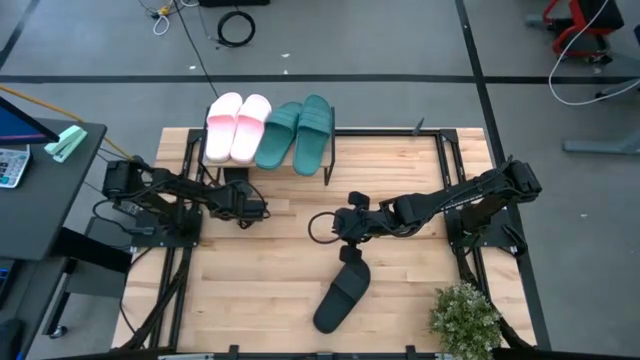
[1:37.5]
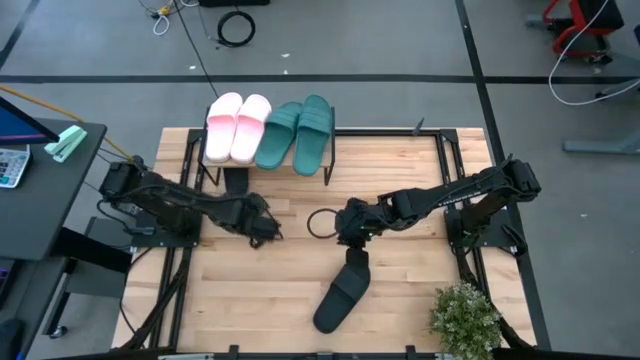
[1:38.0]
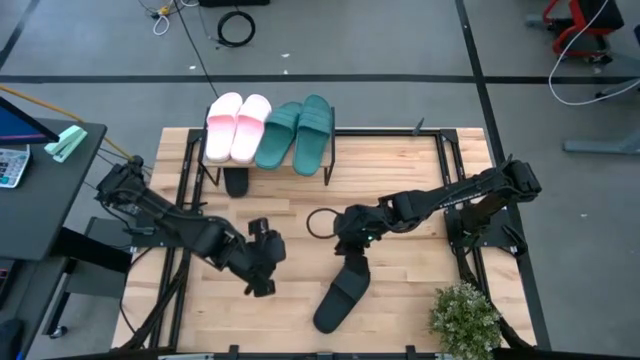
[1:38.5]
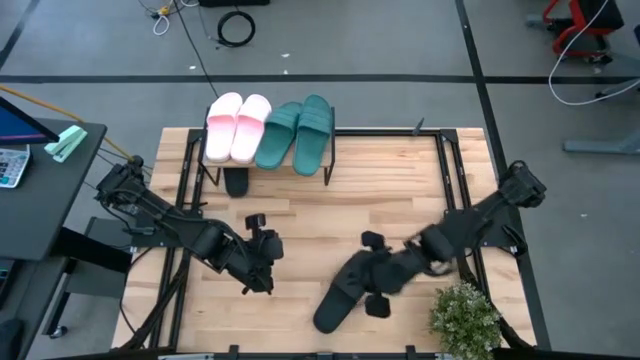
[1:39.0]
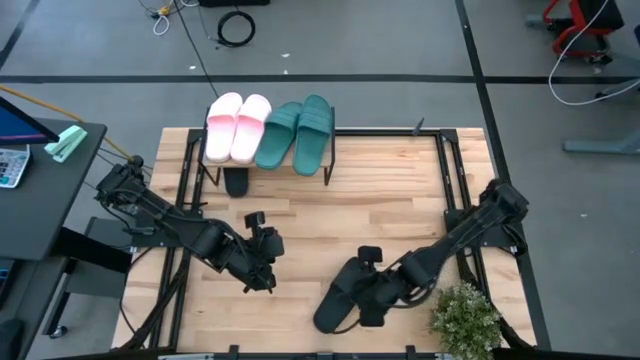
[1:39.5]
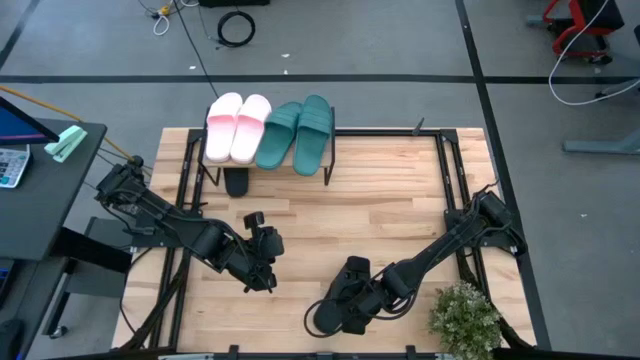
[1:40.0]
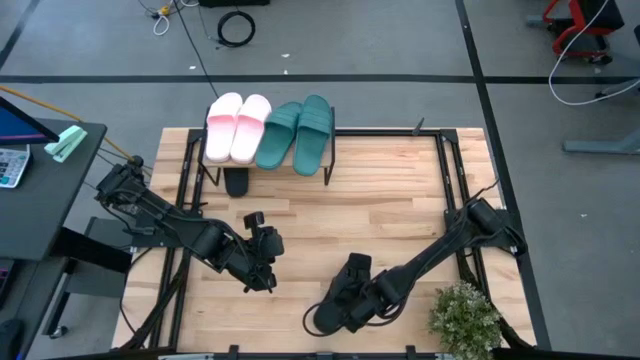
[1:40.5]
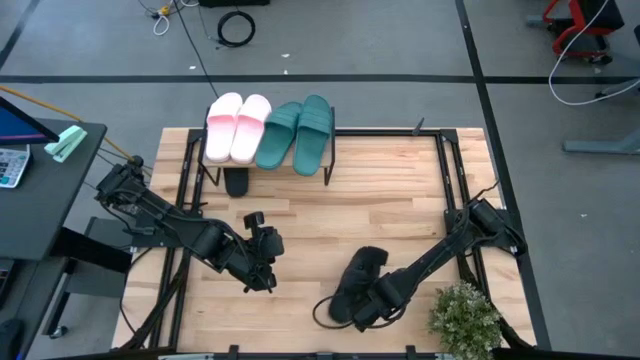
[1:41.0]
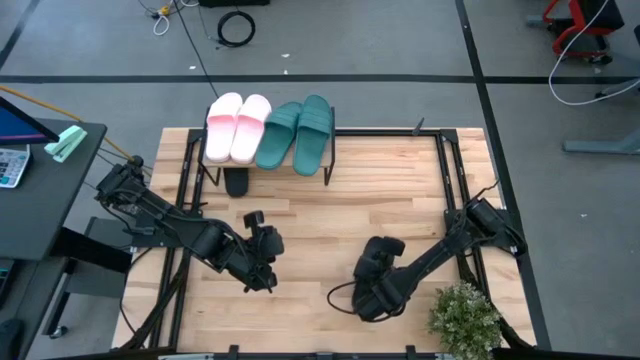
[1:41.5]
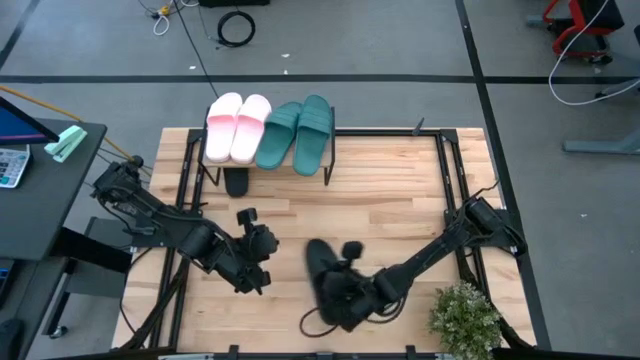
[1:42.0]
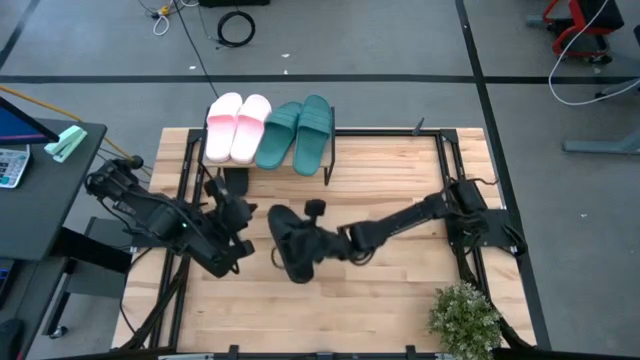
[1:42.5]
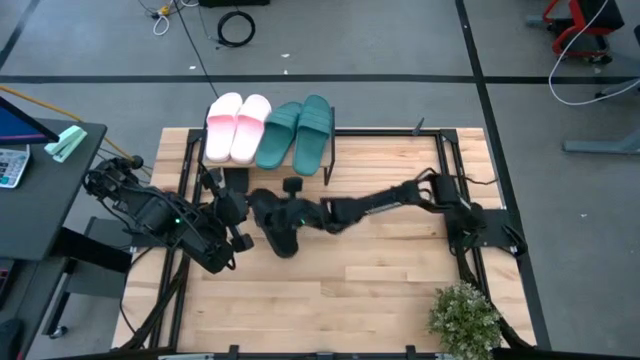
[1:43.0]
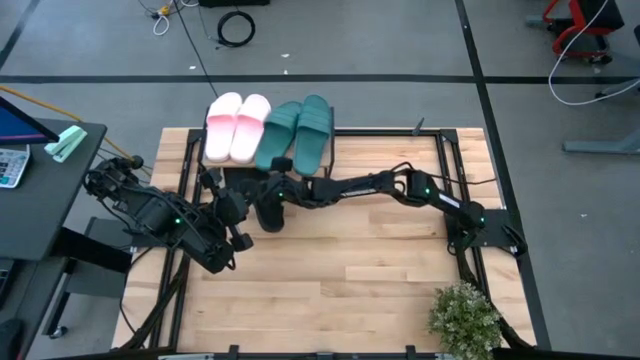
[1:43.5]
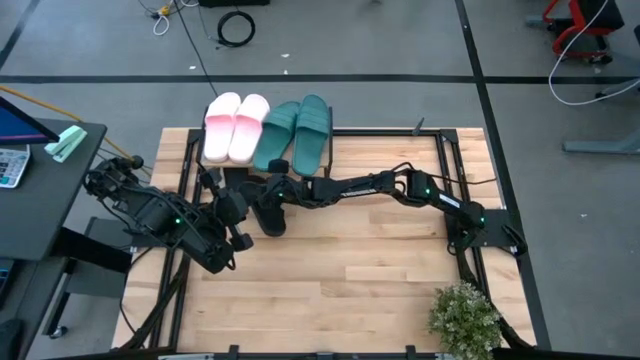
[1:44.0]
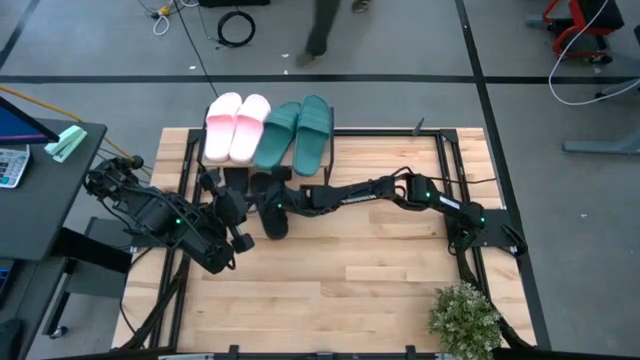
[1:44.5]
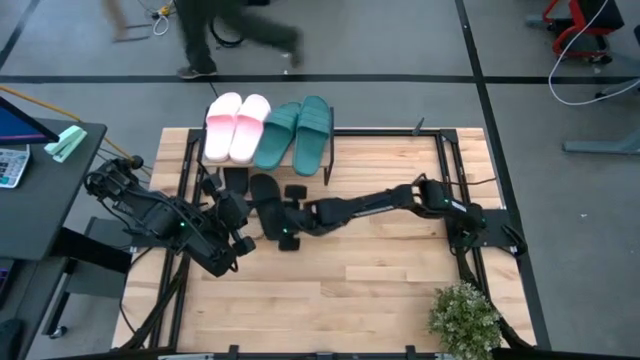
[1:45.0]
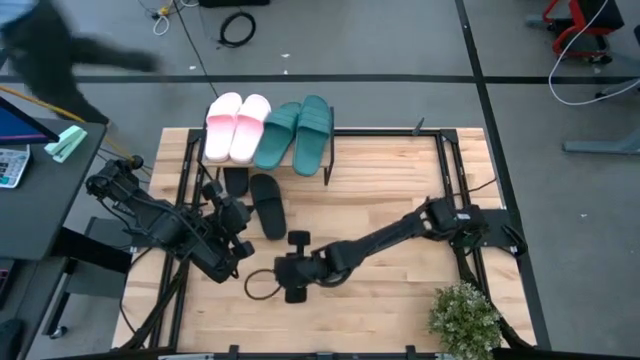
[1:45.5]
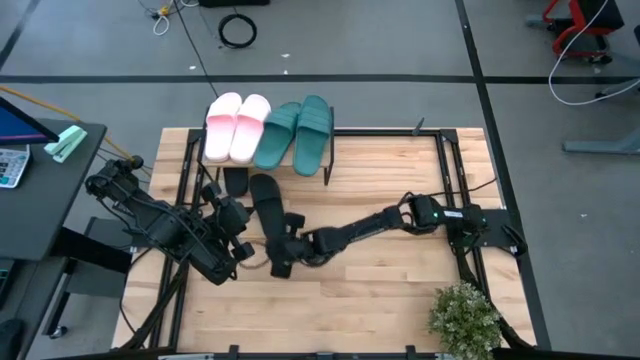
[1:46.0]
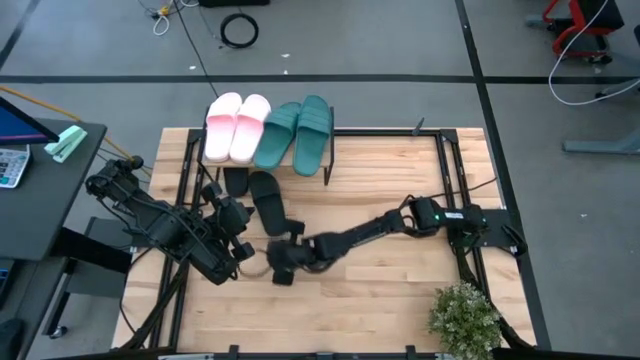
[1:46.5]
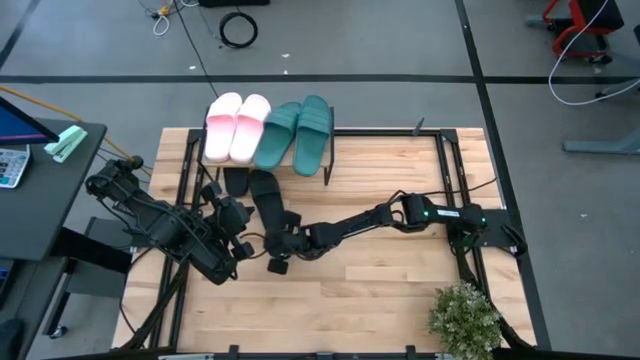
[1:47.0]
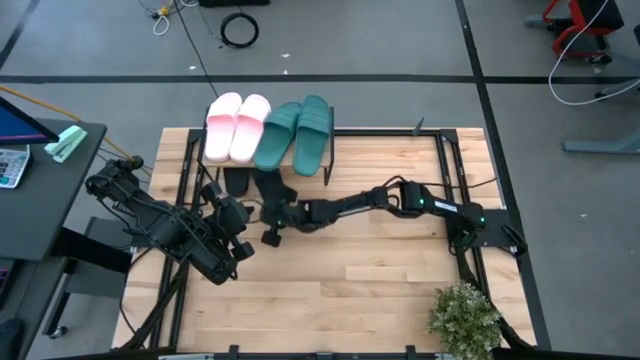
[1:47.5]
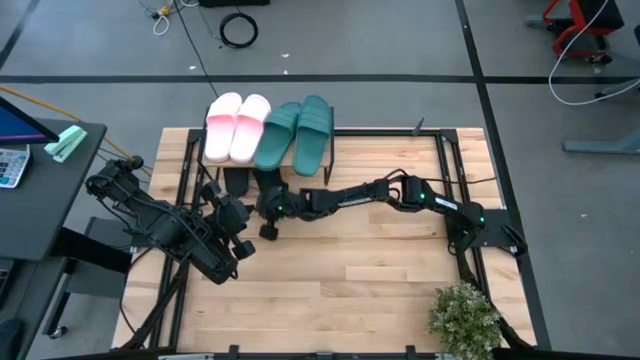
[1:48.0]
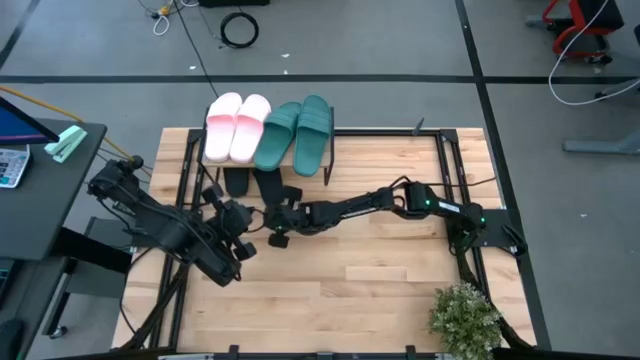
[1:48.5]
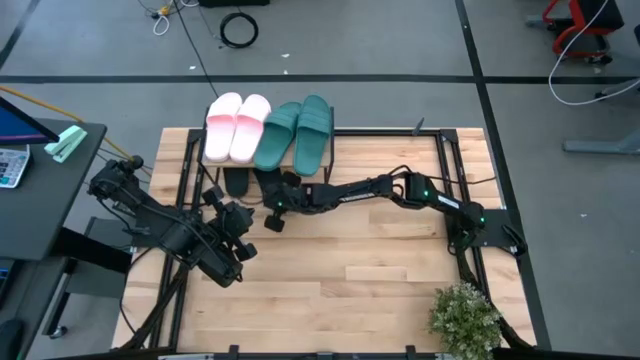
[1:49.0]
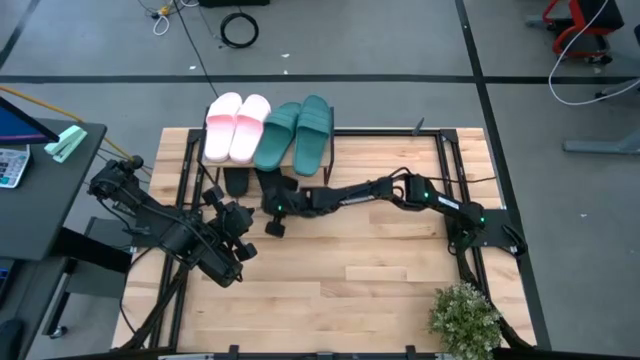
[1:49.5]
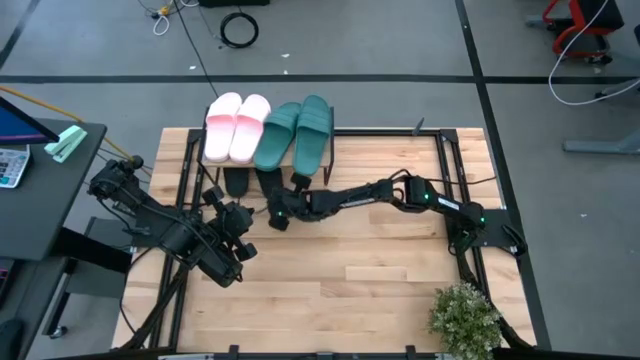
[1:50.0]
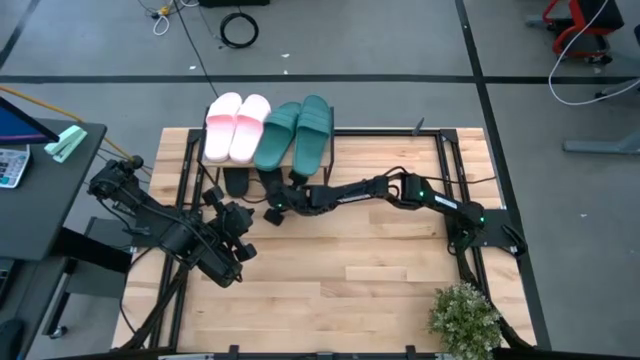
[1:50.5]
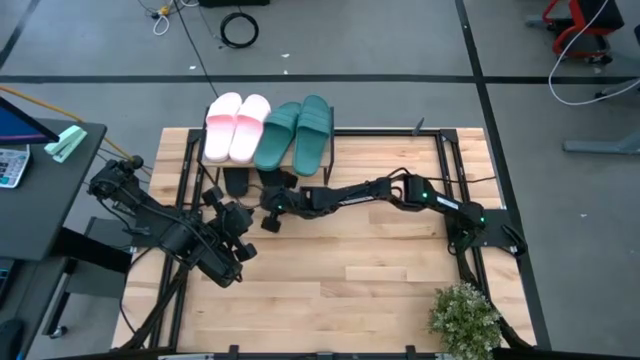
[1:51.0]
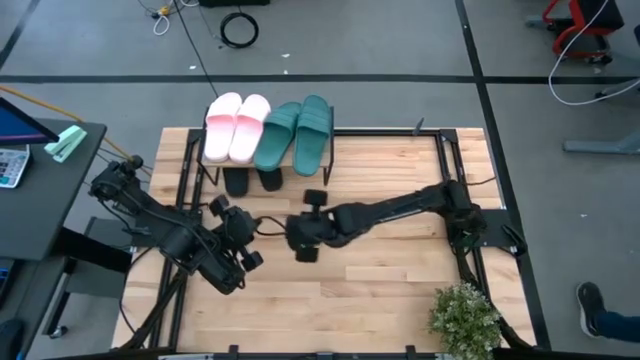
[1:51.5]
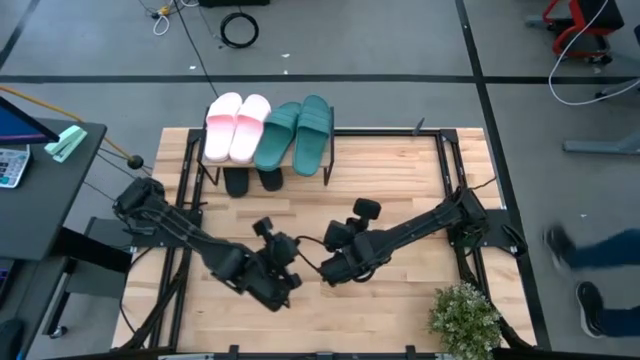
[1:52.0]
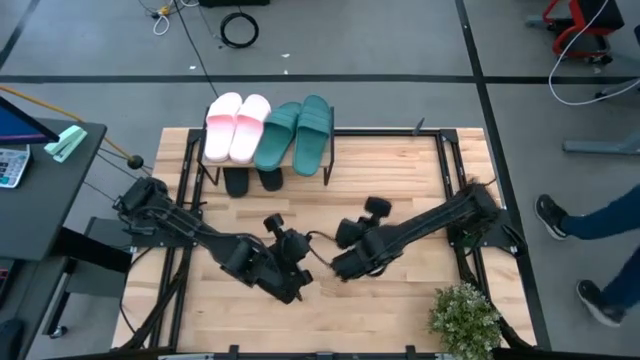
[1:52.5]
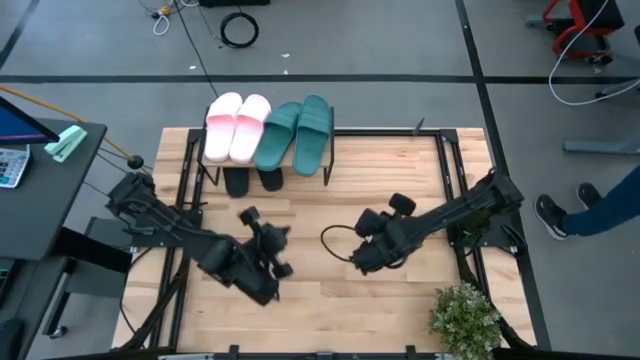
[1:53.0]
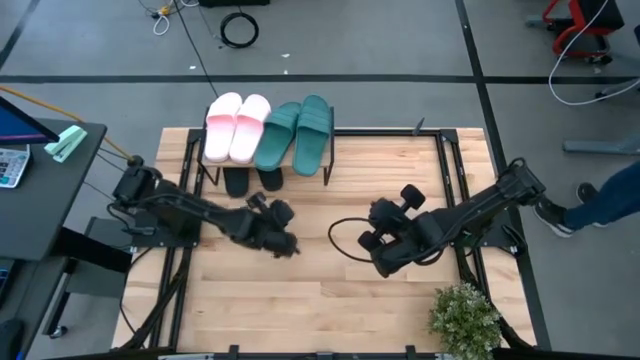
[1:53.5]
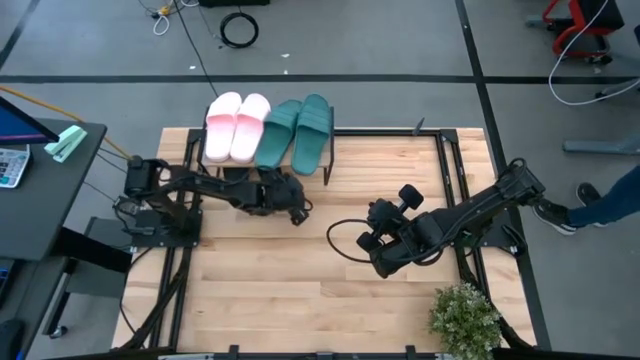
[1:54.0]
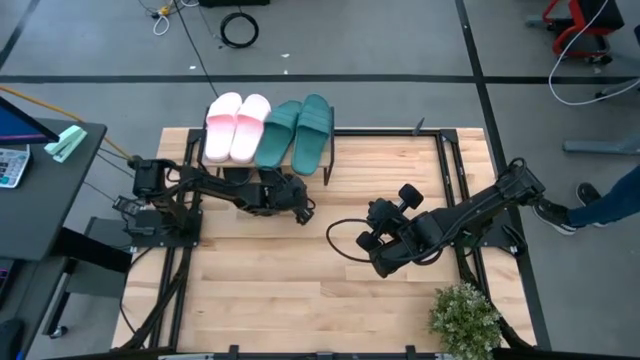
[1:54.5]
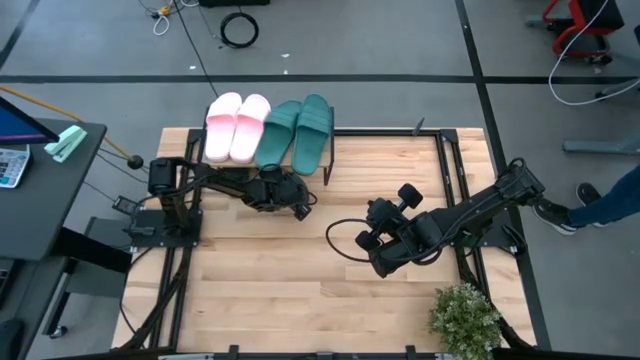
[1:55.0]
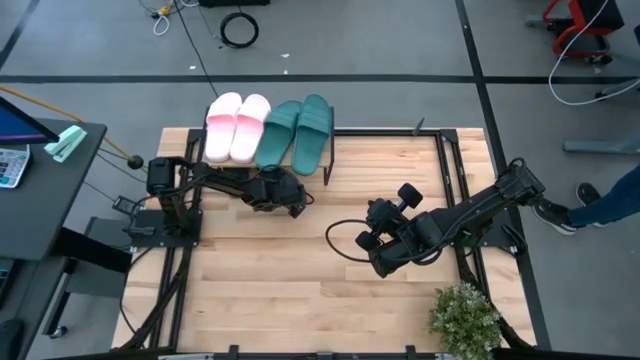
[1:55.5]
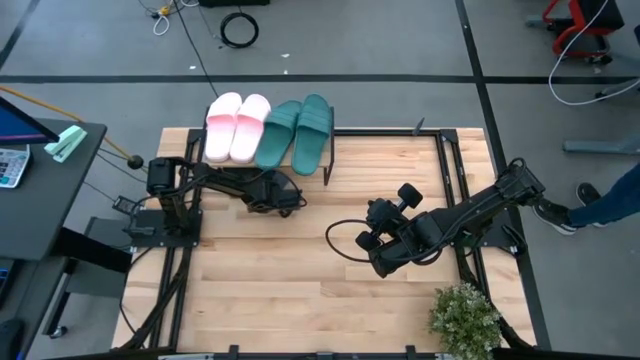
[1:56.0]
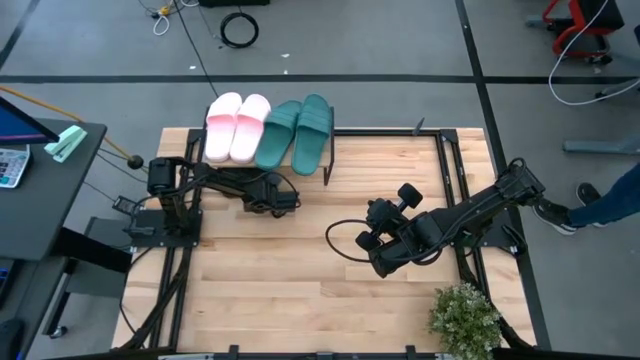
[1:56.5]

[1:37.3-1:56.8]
Task: Pick and place slides into the shelf
Put the black slide under the shelf

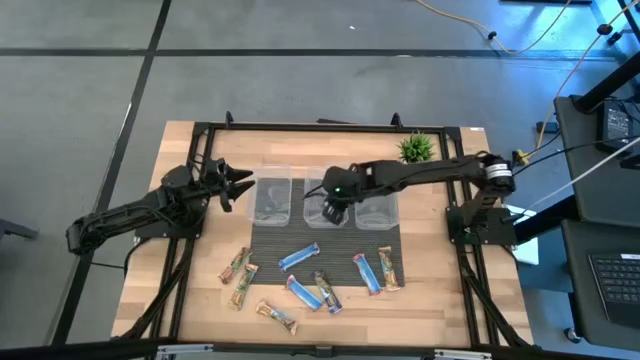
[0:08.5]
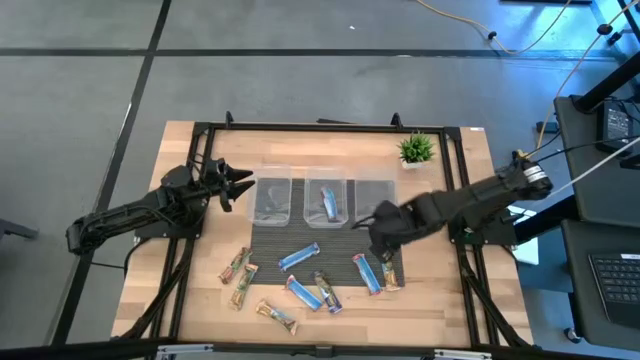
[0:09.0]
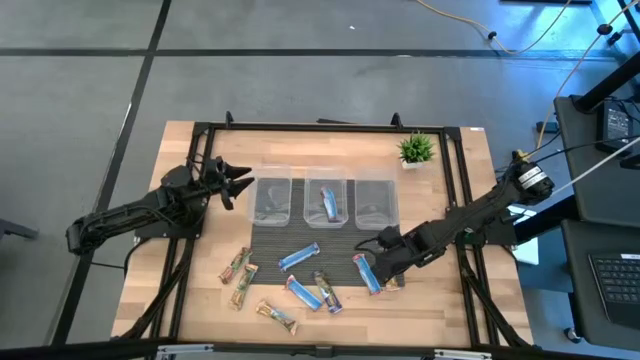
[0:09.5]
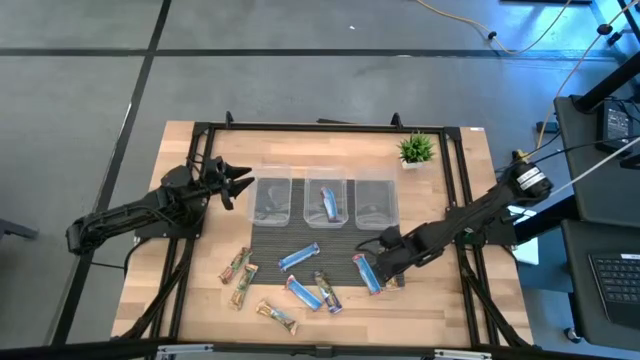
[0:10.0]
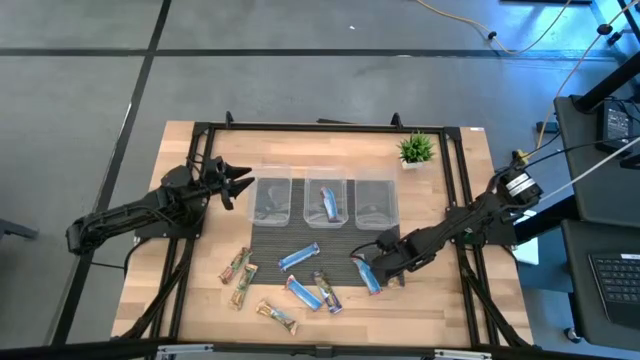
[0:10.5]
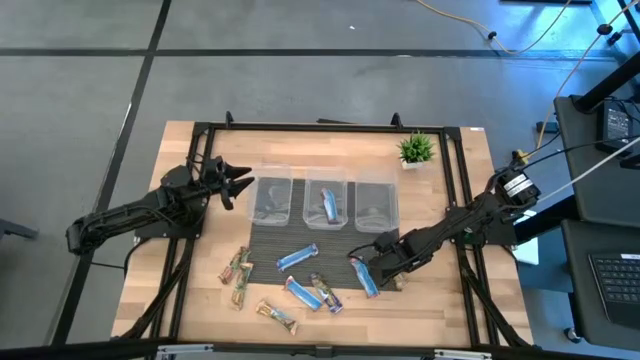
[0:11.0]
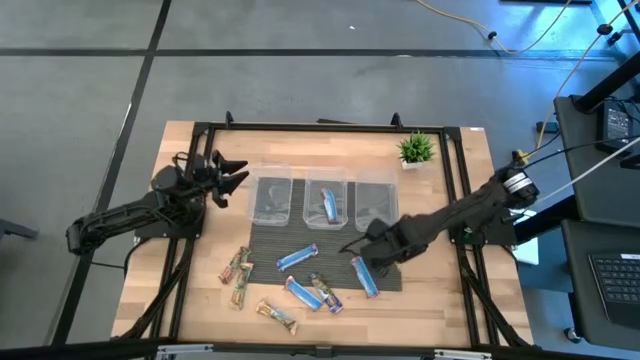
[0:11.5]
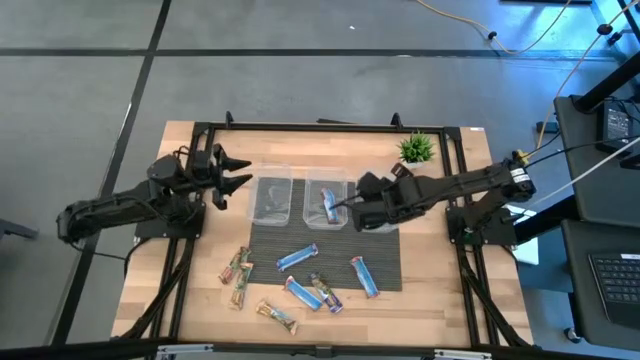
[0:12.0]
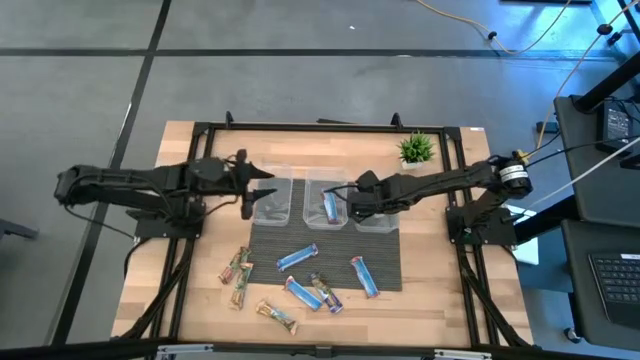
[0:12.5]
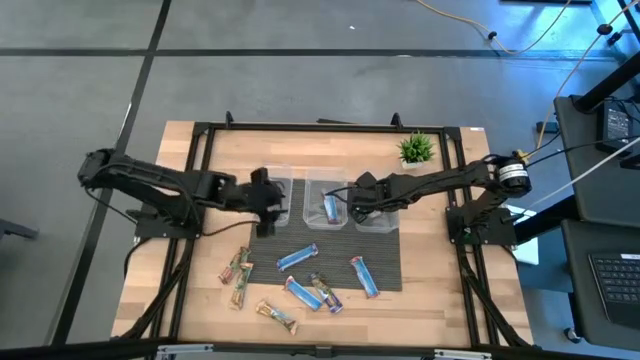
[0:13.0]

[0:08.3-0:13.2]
Task: Pick and place Granola Bars by type
Put the yellow granola bar into the right transparent bin
